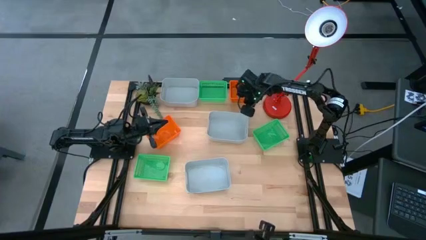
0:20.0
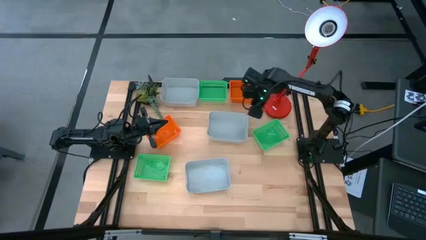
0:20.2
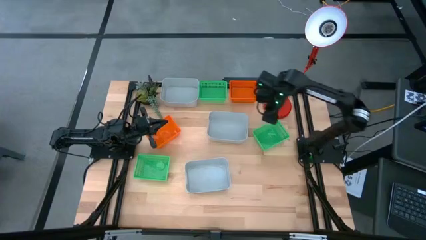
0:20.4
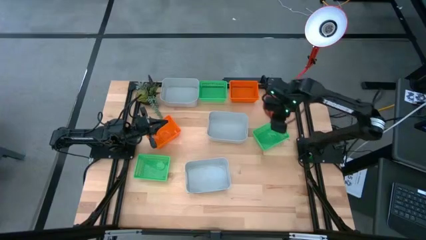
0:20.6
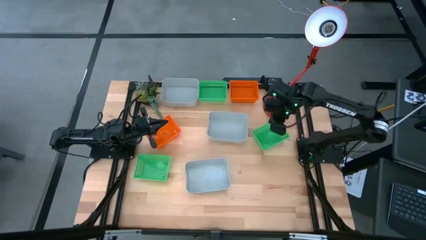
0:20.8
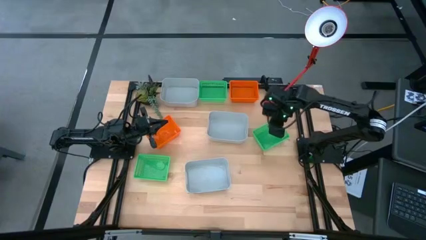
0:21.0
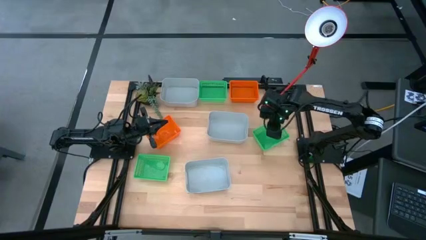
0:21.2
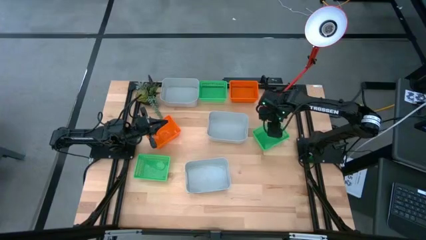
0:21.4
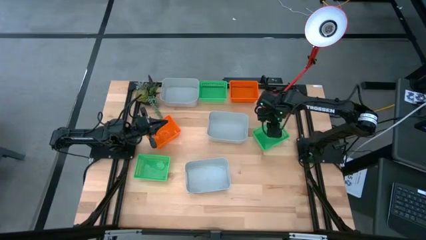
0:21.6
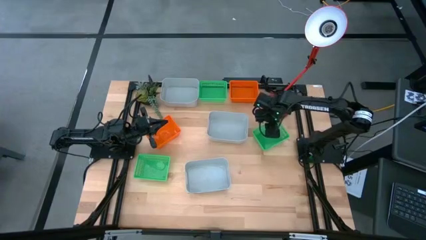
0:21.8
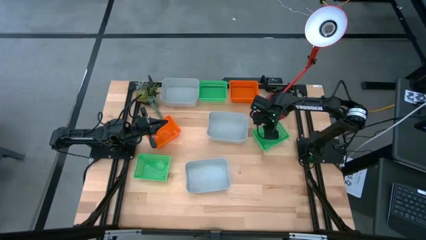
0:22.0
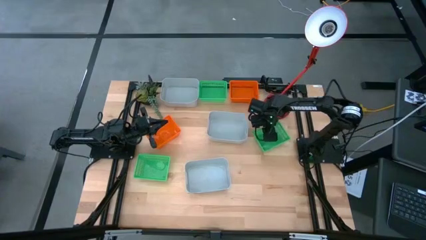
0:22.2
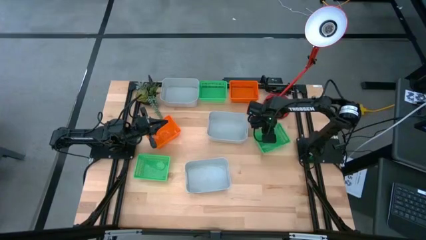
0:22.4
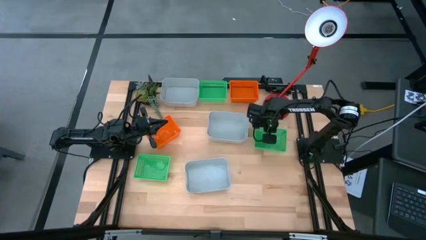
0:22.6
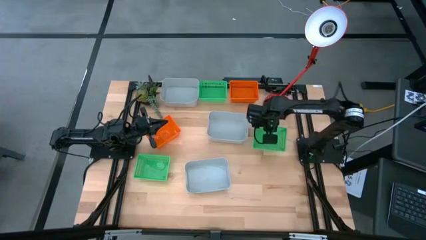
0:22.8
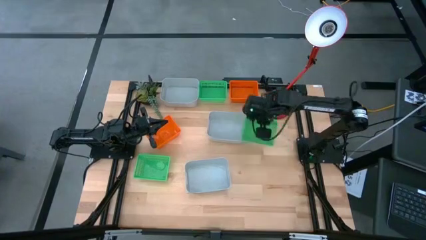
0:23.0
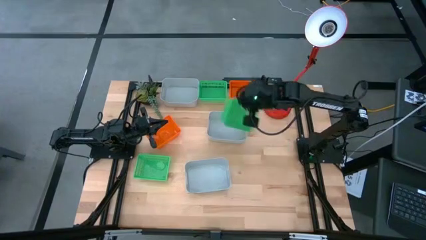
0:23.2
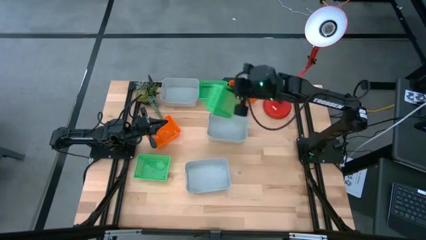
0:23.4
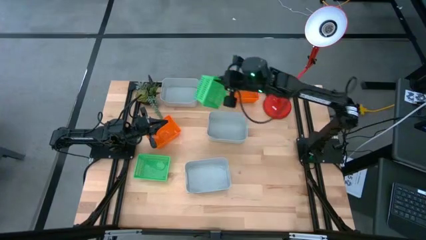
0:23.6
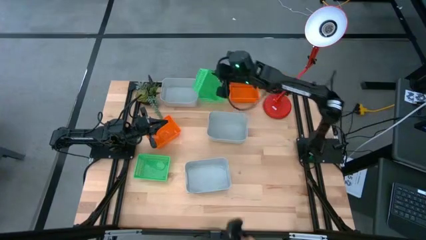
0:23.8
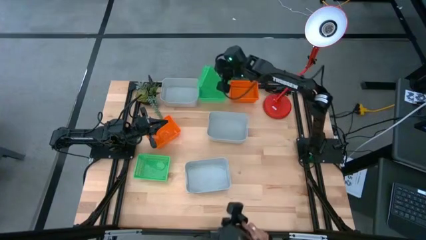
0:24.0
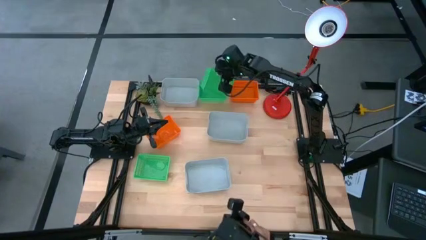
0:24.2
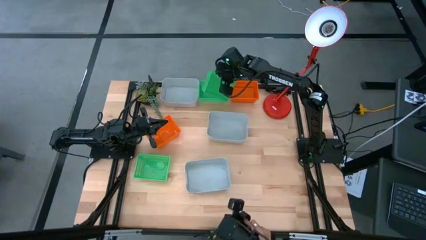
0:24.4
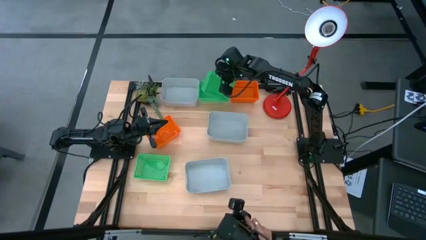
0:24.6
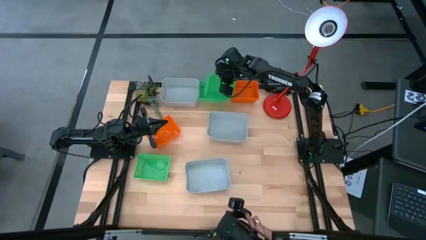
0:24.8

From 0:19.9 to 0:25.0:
Stack the middle right green bin on top of the top green bin

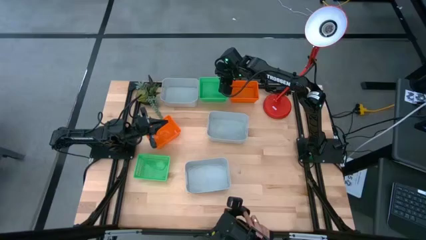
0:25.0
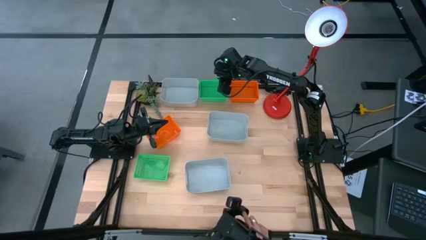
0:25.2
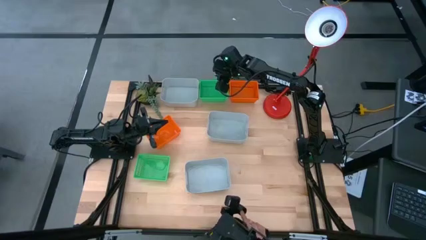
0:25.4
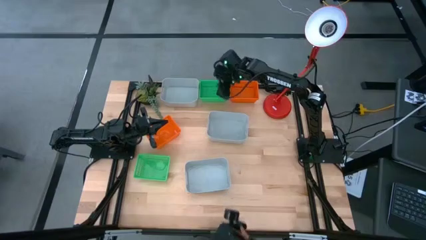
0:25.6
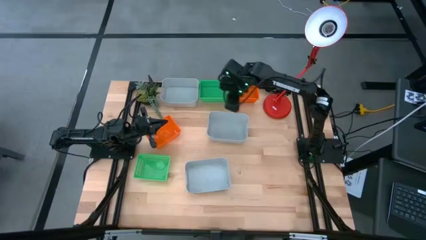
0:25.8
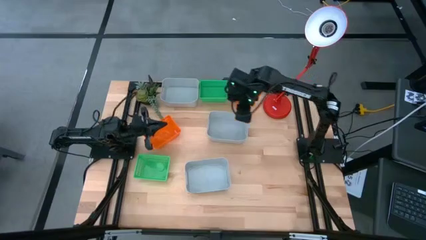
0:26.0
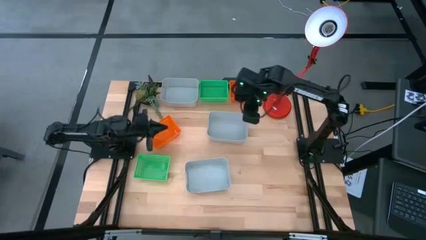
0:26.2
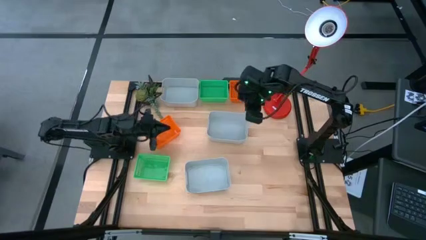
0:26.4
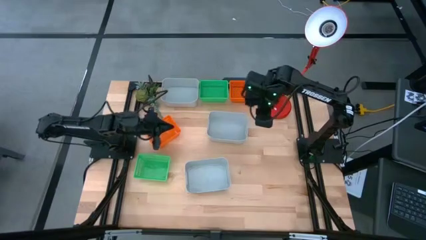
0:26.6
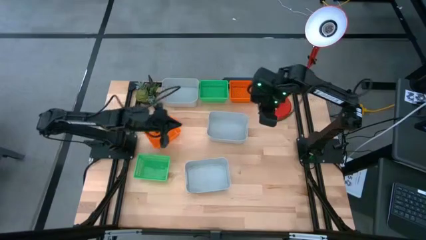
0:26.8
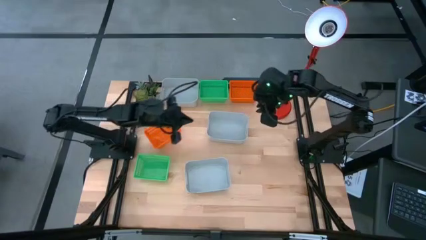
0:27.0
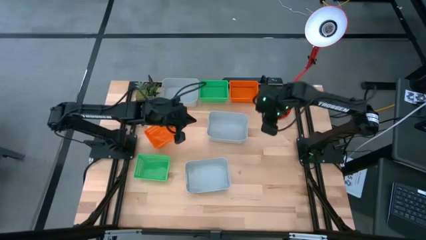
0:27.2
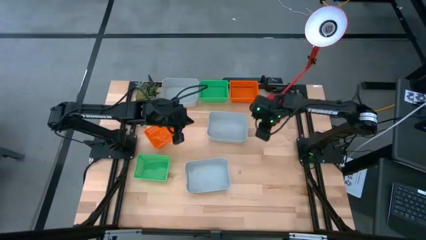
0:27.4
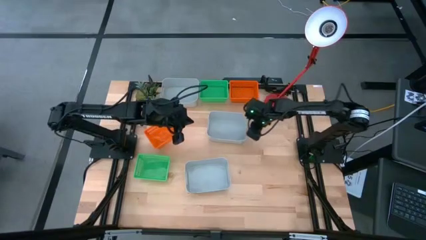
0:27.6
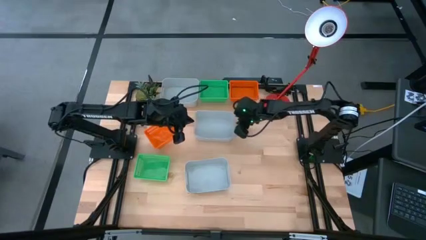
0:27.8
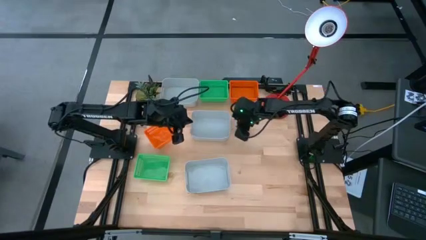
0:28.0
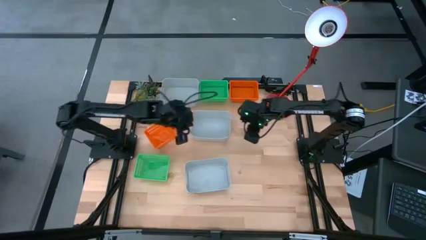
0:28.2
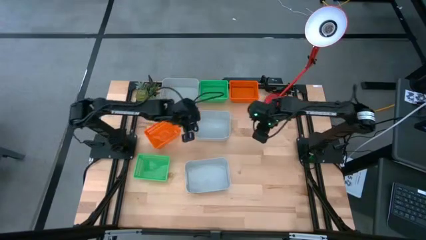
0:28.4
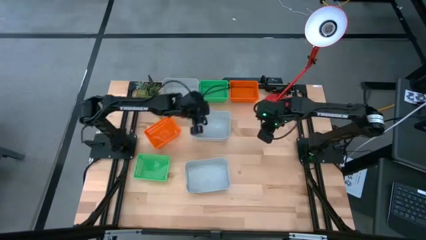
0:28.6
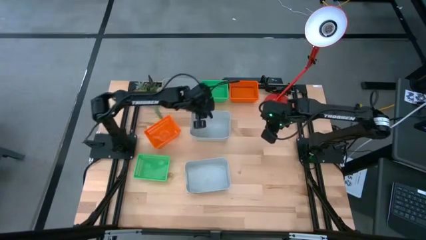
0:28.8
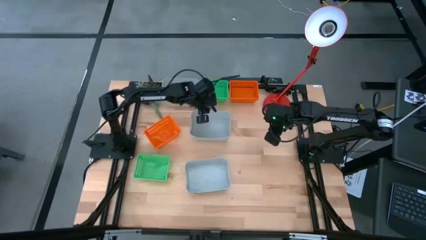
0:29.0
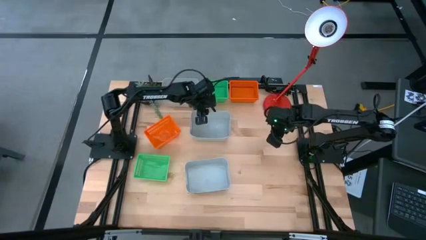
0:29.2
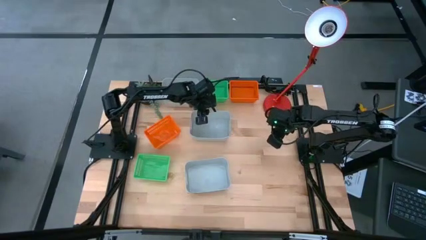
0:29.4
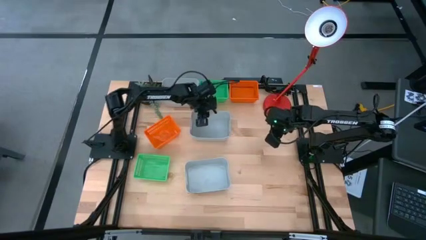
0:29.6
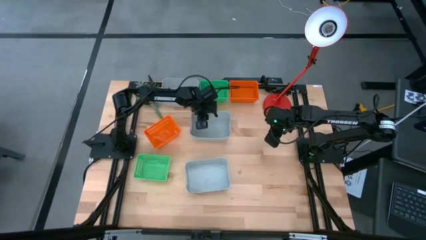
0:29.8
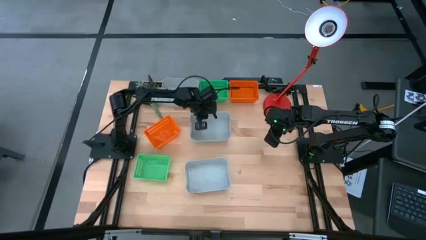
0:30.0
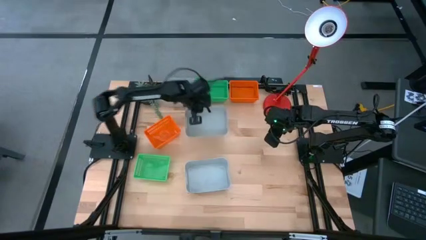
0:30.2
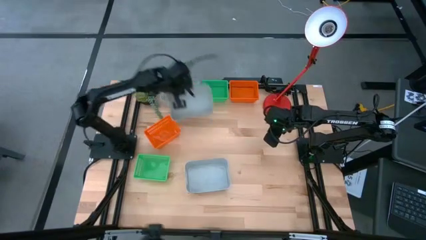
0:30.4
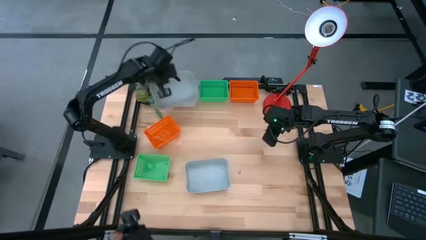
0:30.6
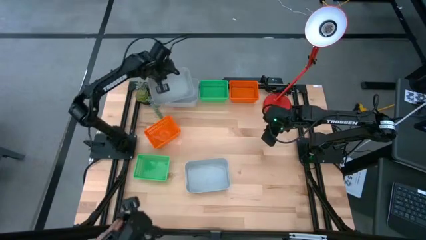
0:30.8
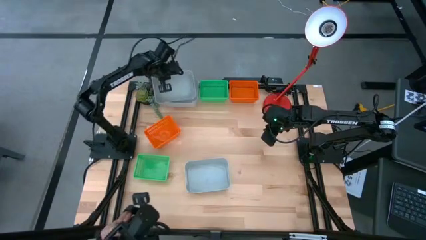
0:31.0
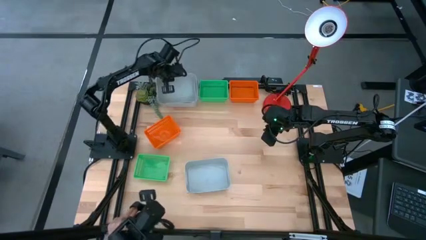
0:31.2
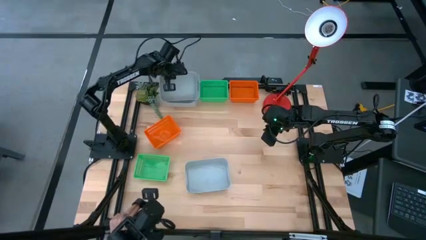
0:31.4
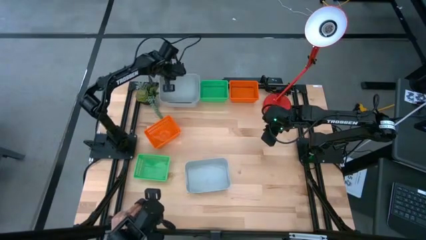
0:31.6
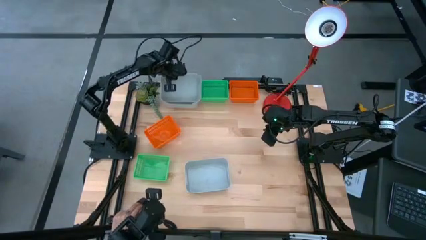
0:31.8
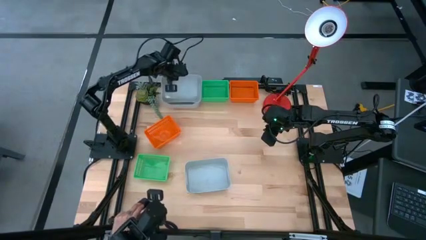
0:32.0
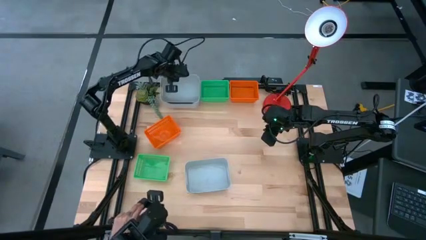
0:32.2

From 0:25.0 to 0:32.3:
Stack the middle gray bin on top of the top gray bin
